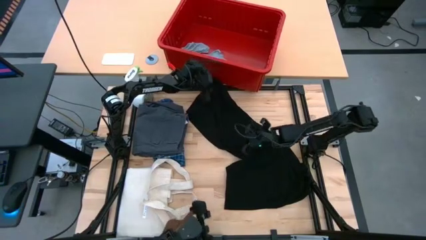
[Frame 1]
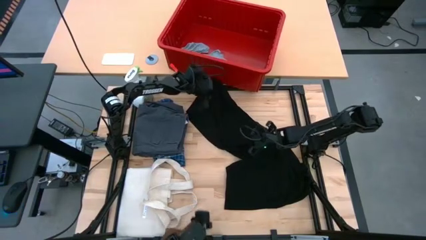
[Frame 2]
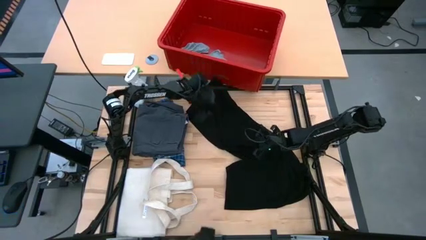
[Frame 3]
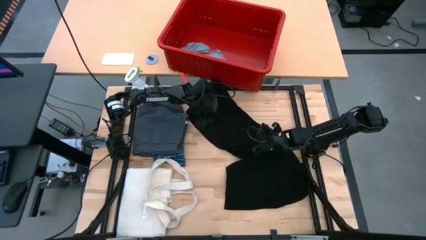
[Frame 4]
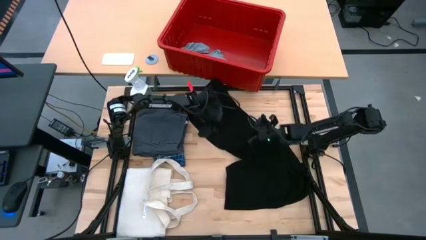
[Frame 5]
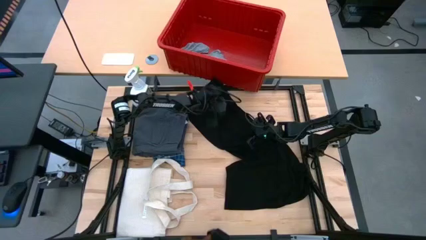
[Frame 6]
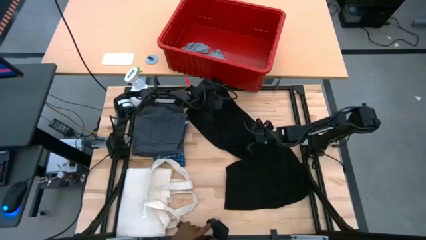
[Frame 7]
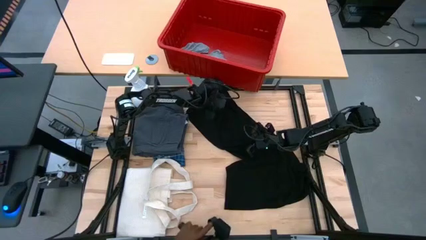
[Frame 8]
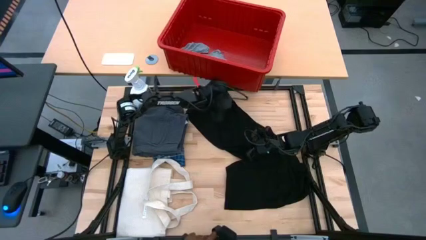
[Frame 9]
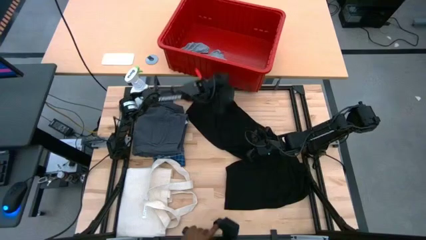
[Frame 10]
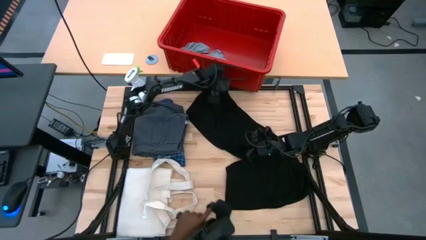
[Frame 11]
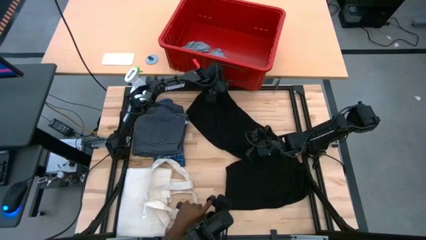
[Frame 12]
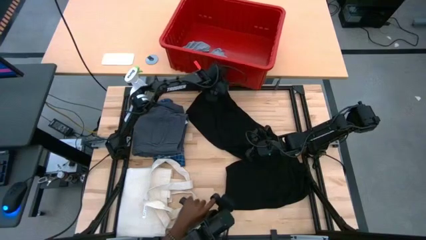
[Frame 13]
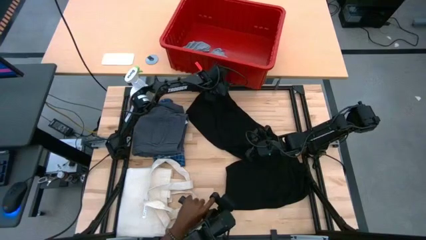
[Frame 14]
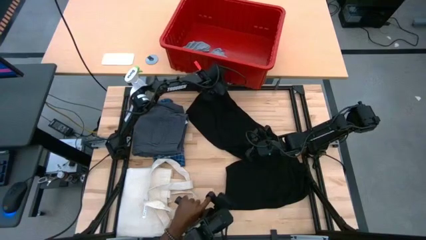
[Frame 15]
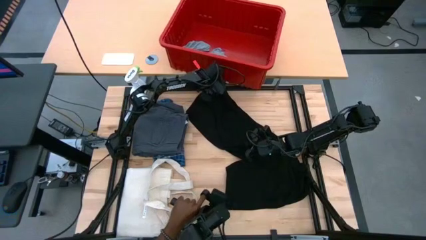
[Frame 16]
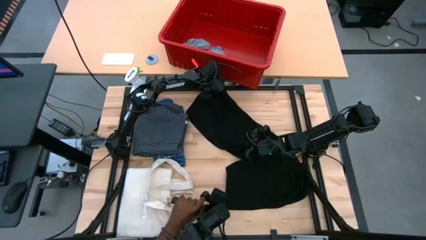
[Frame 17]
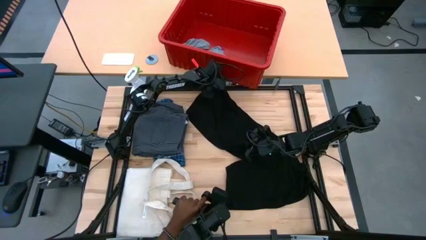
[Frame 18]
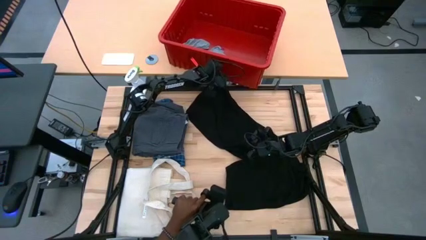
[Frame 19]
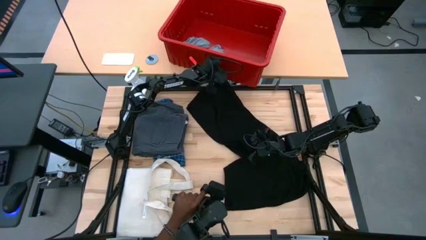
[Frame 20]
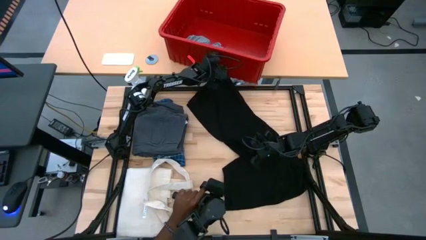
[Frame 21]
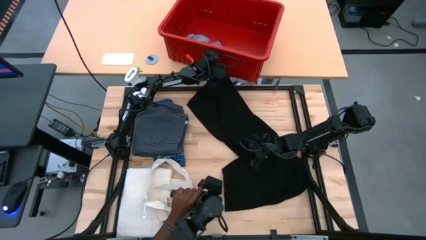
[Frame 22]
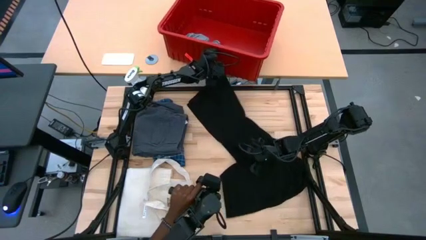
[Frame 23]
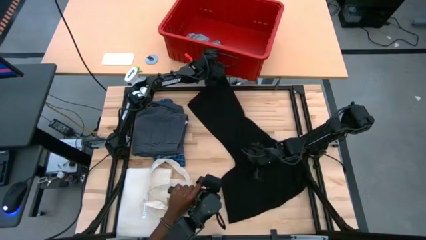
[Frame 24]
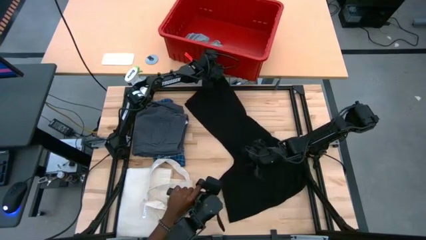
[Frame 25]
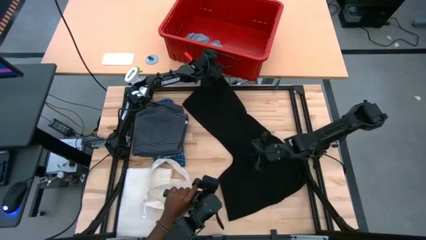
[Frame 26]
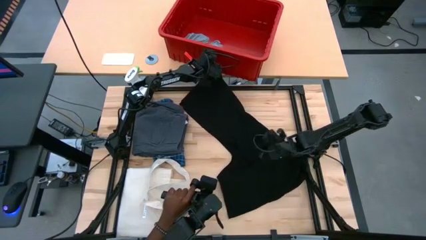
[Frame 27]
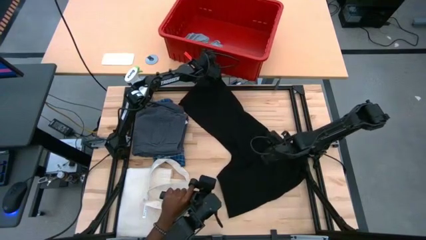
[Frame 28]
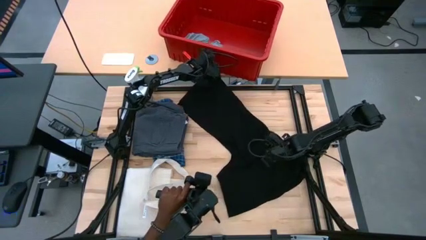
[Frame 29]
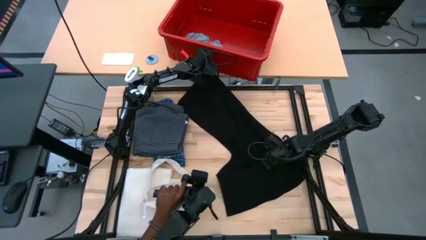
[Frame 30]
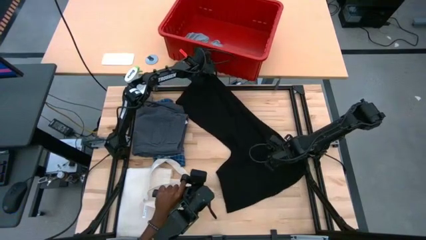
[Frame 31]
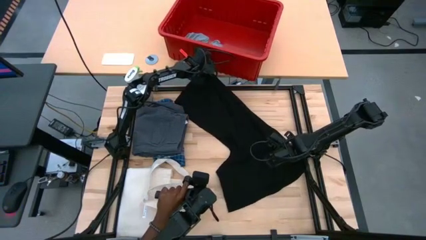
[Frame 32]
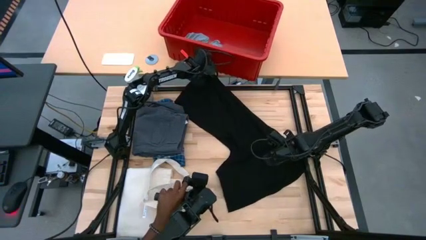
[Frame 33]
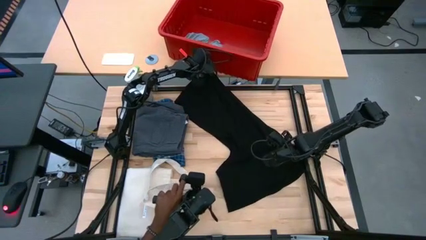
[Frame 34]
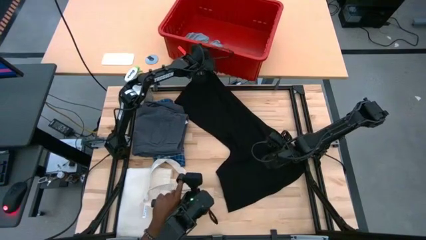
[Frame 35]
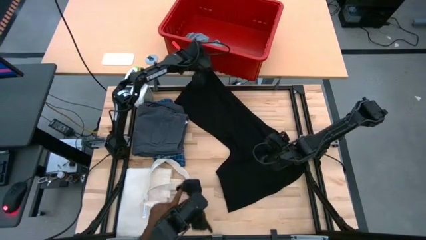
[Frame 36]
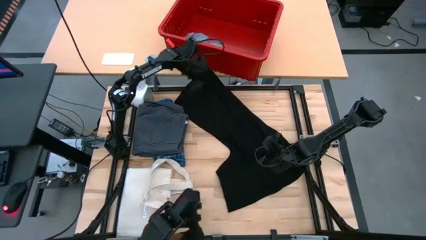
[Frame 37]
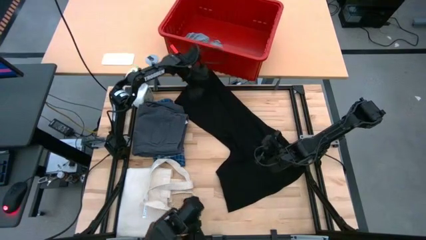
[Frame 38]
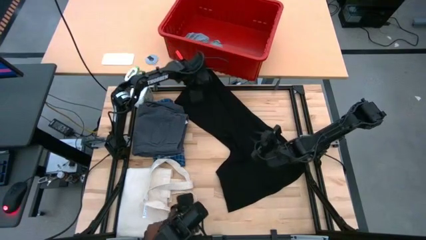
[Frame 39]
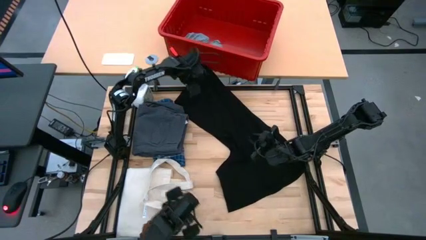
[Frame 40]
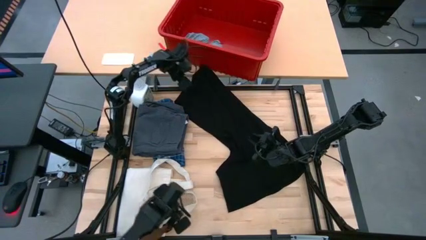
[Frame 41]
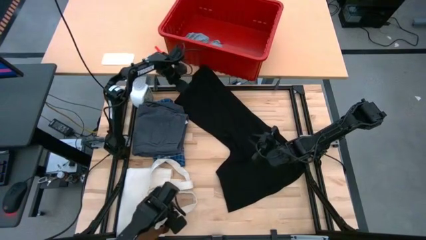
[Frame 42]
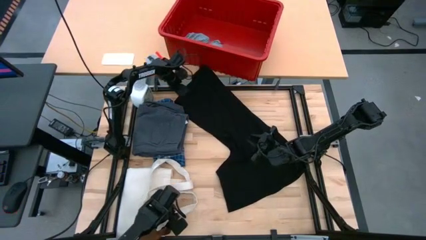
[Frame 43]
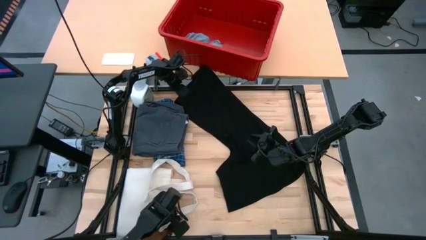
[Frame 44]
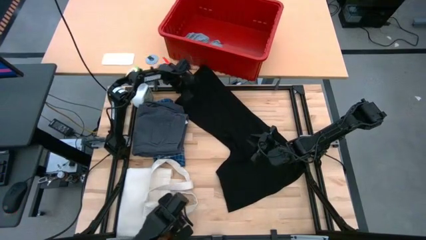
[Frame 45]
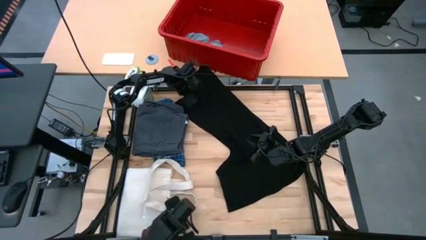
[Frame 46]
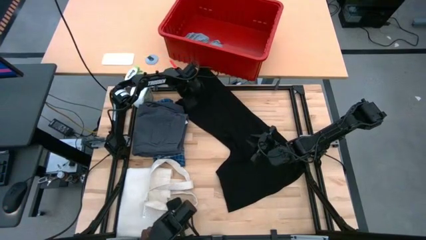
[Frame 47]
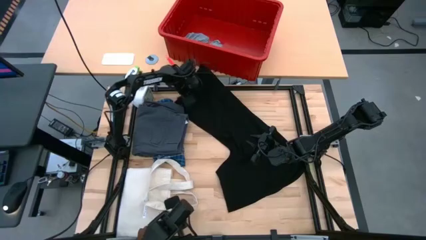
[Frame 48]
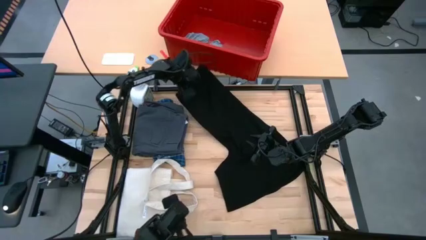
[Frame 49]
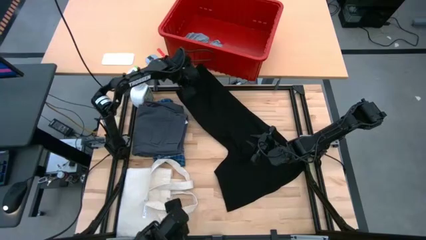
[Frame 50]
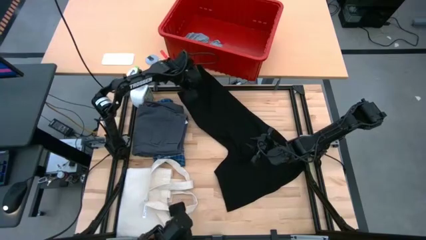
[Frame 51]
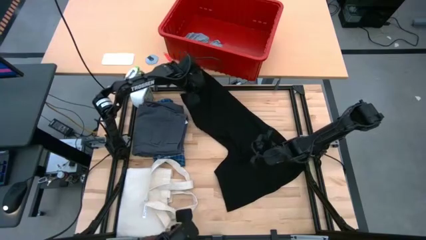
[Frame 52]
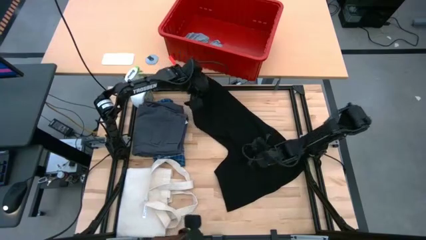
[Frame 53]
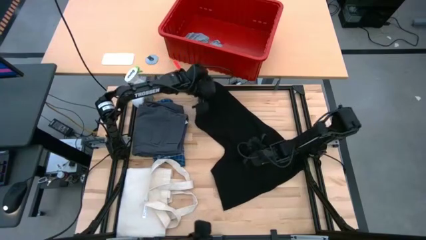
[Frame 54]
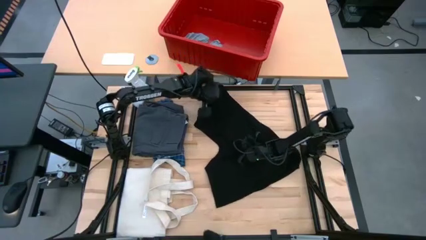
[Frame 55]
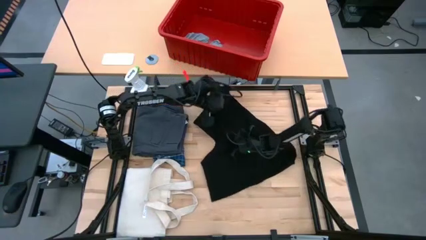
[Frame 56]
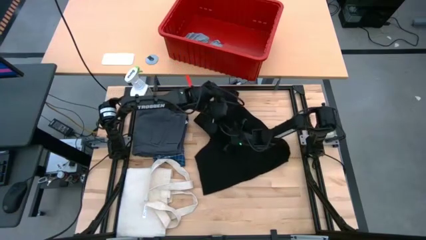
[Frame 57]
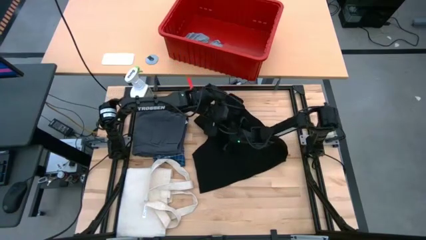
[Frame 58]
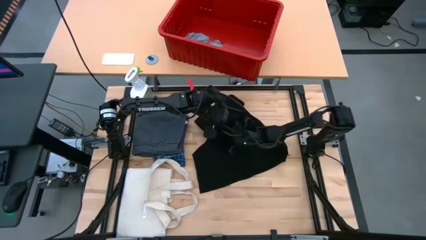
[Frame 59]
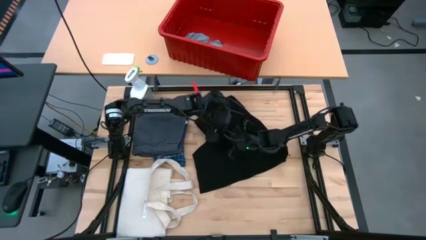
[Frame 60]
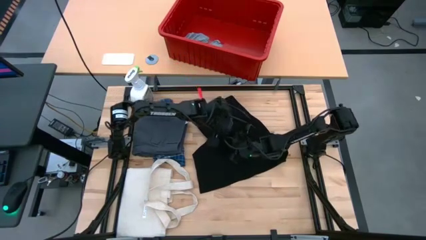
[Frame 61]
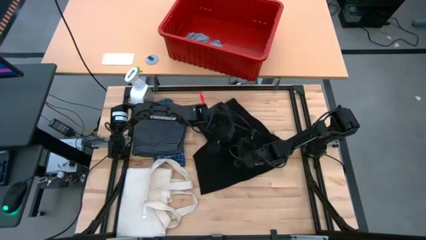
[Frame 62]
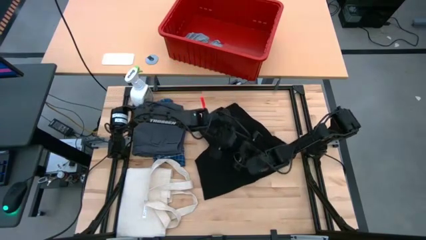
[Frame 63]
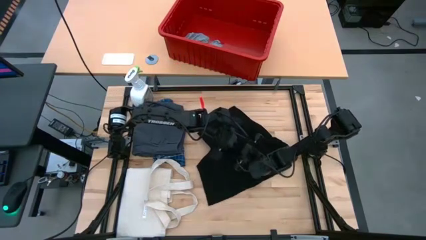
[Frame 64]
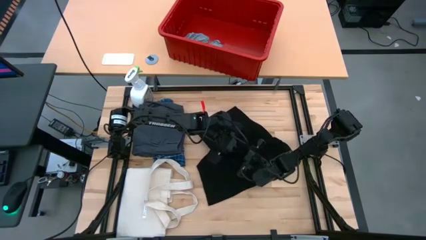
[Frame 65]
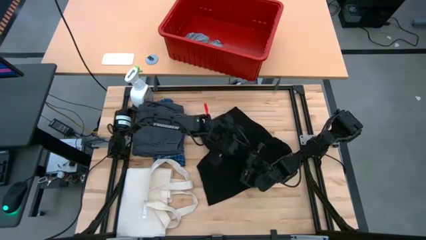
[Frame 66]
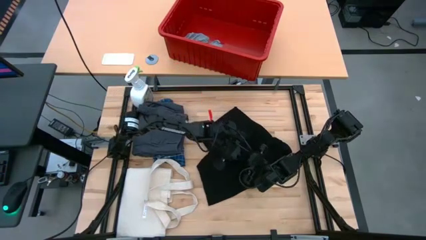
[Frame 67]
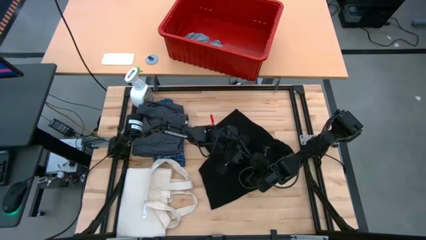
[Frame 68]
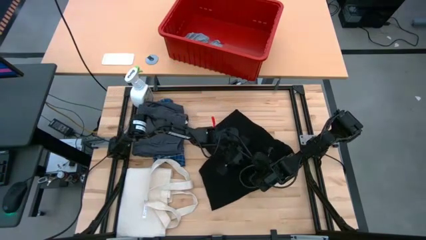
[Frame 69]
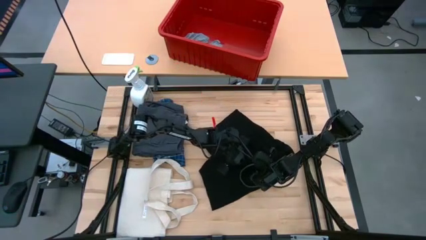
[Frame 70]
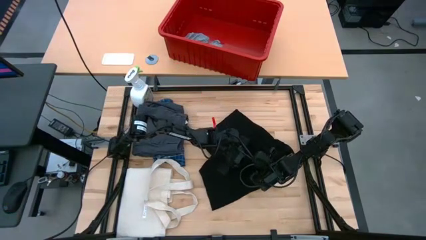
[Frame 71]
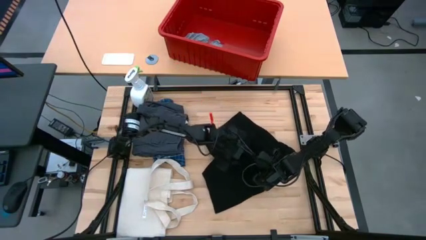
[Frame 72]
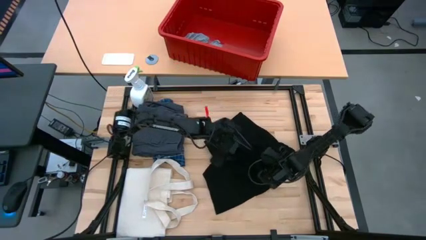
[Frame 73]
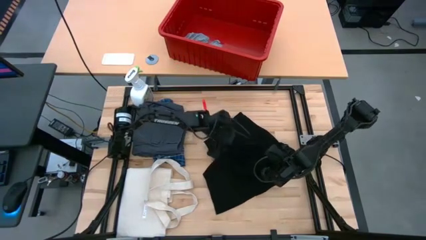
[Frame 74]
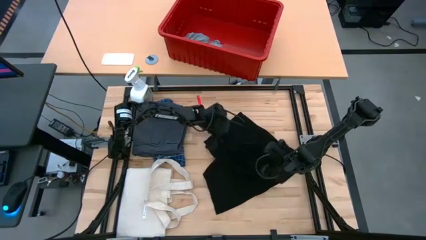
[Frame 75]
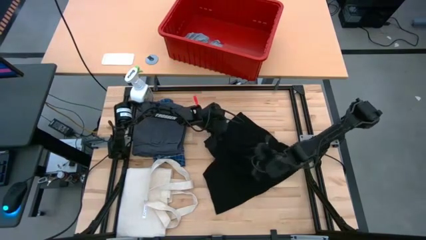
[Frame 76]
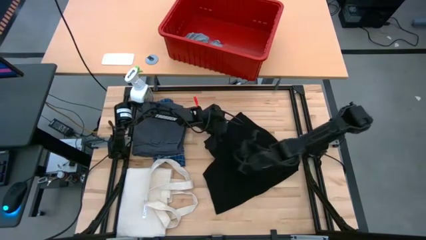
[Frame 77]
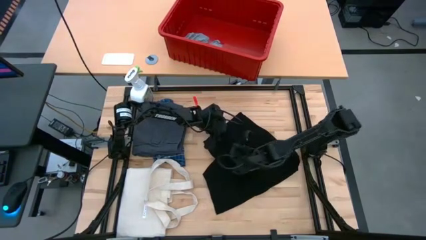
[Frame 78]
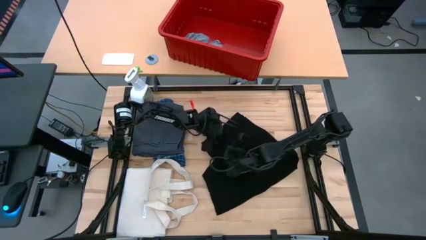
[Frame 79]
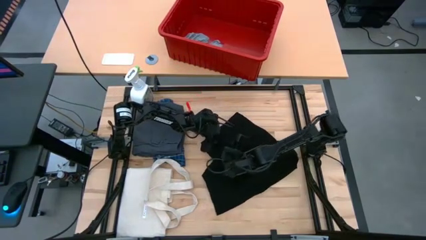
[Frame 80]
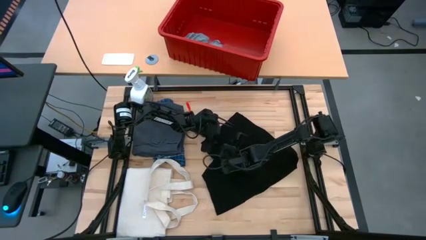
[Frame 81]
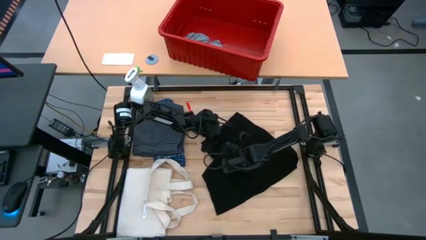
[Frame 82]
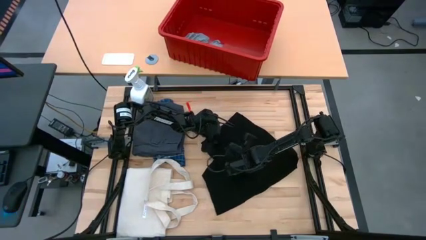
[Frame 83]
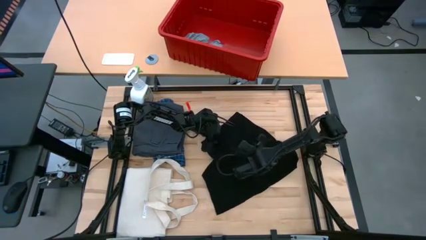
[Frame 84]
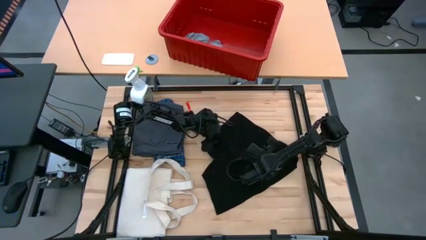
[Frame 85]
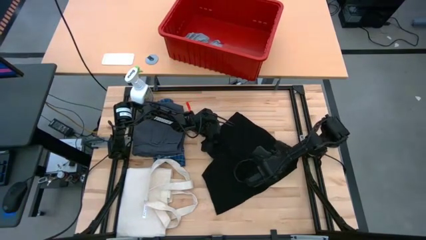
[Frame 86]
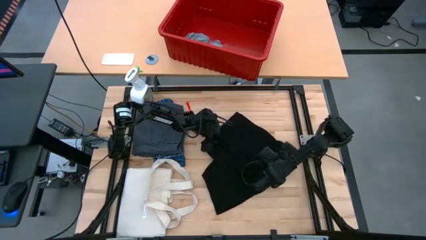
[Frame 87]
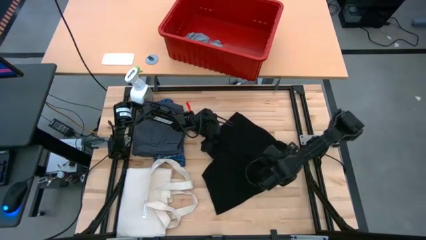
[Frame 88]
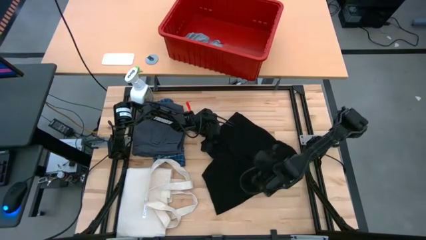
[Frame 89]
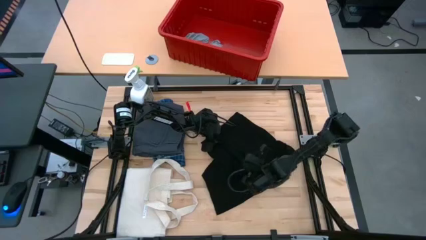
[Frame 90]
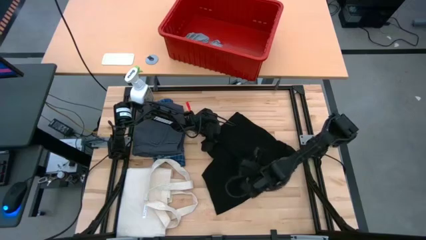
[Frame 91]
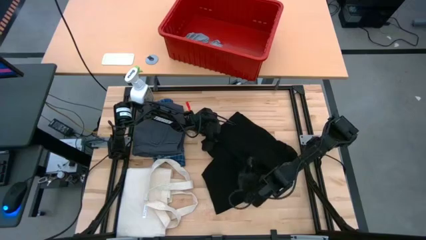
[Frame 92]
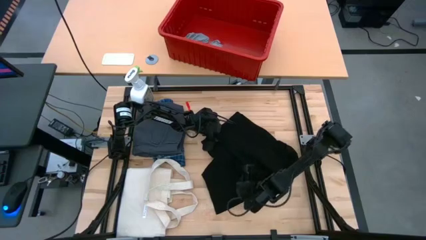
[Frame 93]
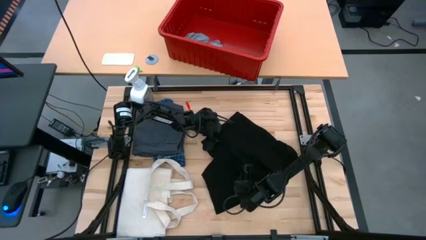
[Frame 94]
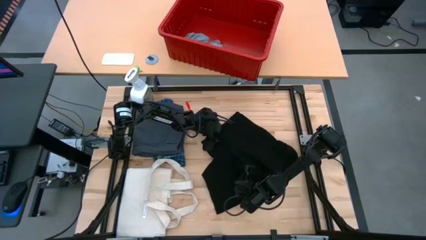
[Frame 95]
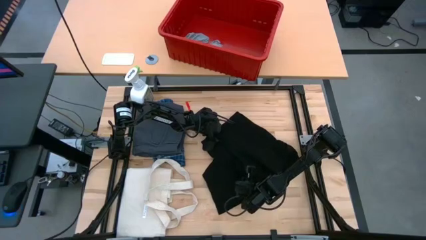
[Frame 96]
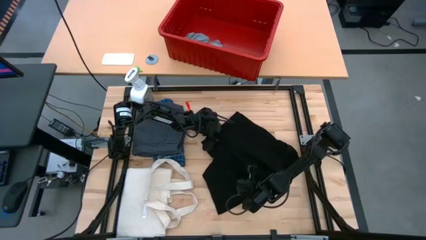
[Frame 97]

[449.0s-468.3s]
Task: Fold Laundry from Bin
Fold the black shirt
